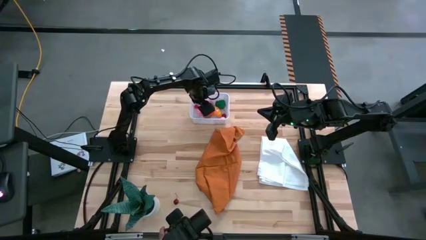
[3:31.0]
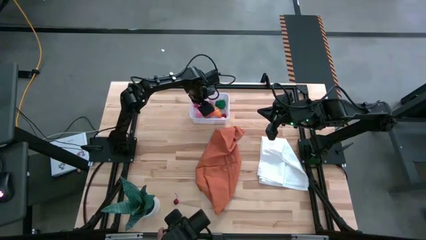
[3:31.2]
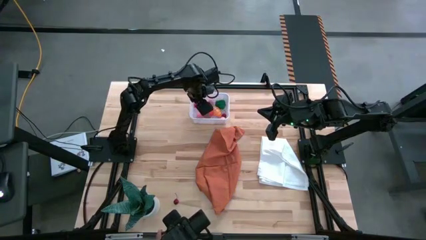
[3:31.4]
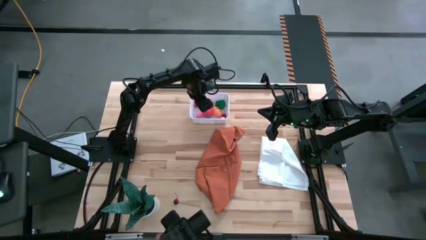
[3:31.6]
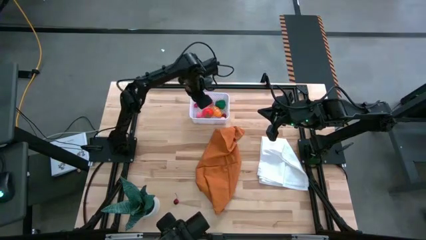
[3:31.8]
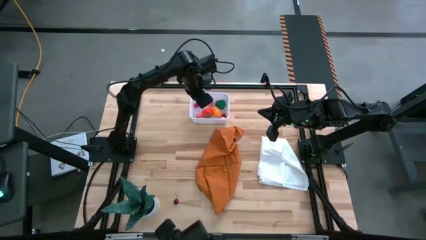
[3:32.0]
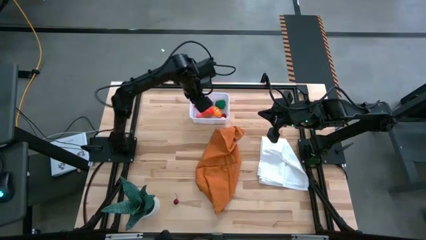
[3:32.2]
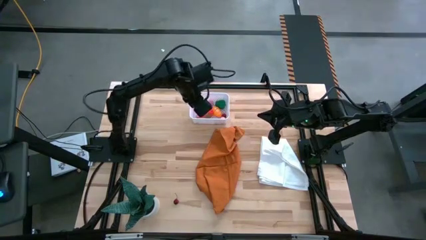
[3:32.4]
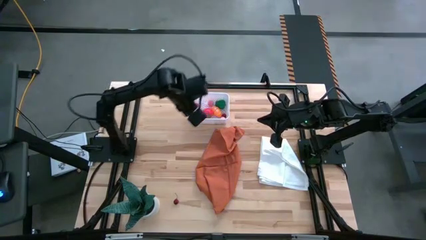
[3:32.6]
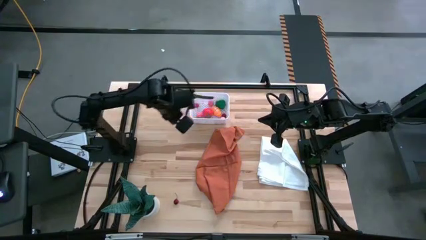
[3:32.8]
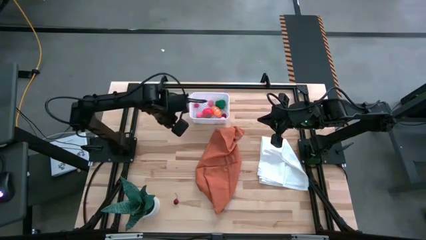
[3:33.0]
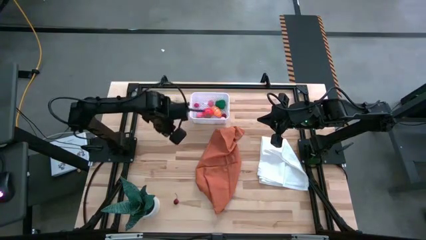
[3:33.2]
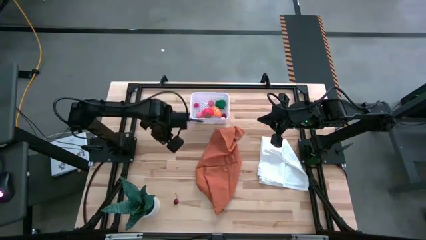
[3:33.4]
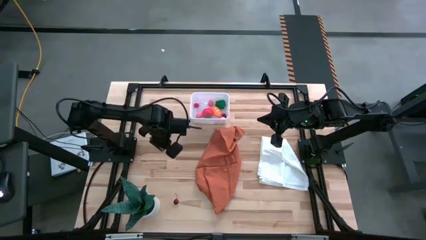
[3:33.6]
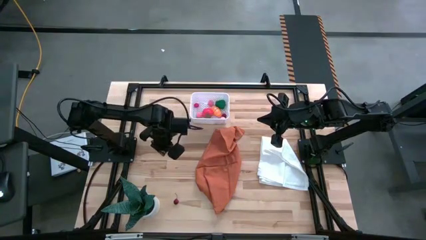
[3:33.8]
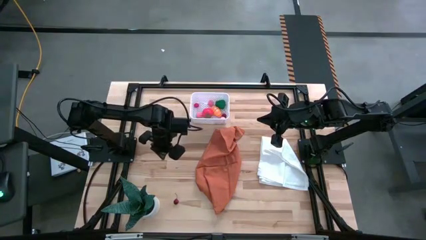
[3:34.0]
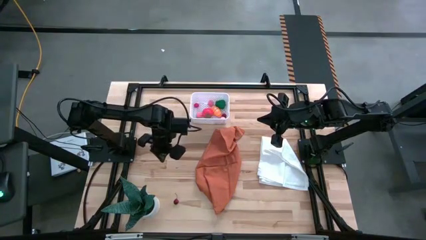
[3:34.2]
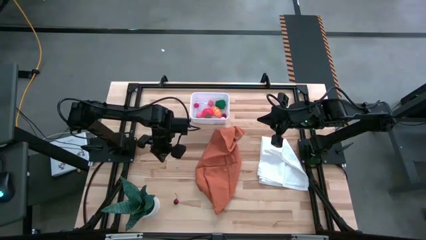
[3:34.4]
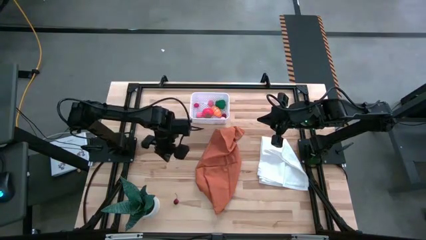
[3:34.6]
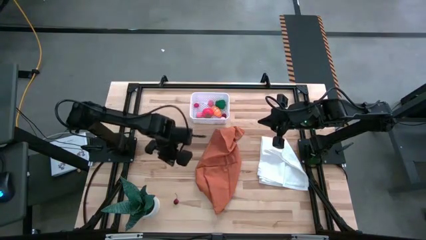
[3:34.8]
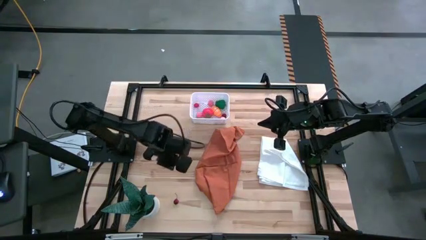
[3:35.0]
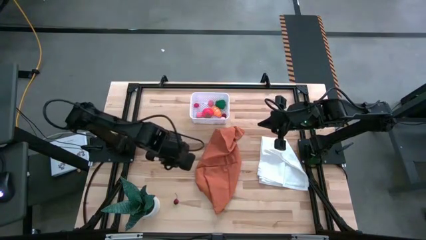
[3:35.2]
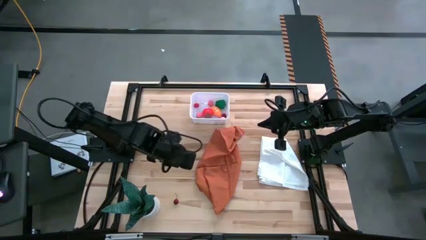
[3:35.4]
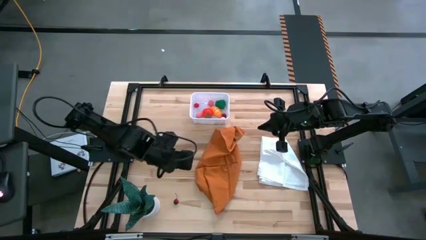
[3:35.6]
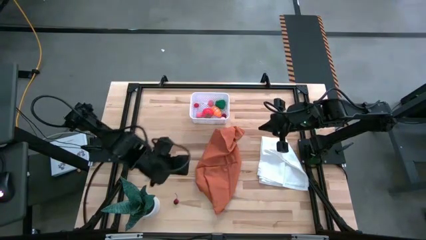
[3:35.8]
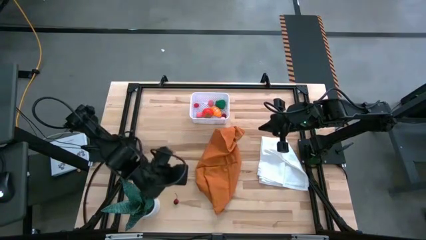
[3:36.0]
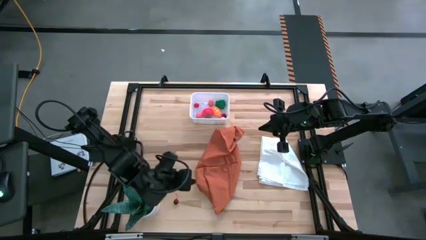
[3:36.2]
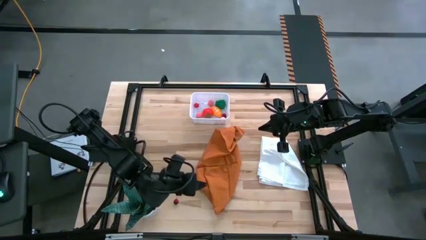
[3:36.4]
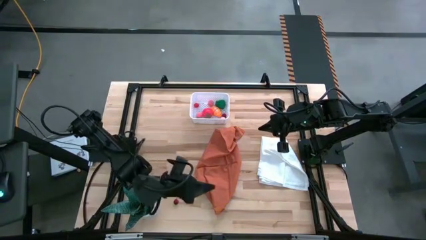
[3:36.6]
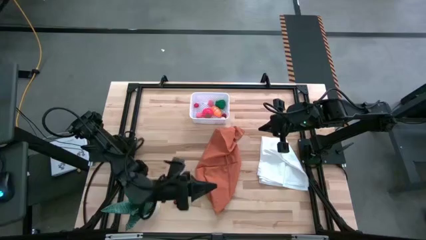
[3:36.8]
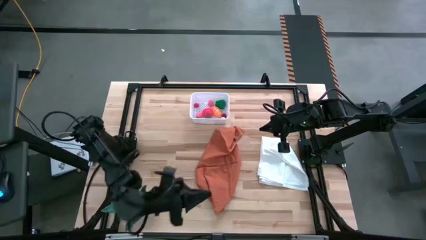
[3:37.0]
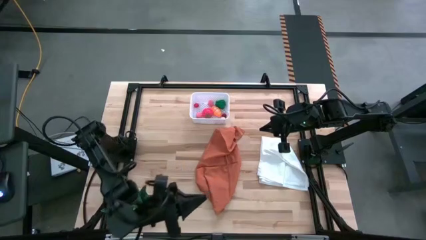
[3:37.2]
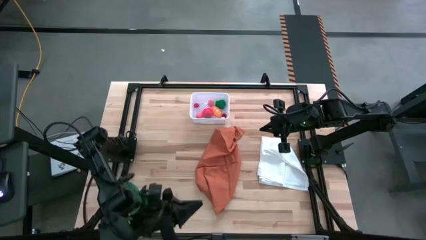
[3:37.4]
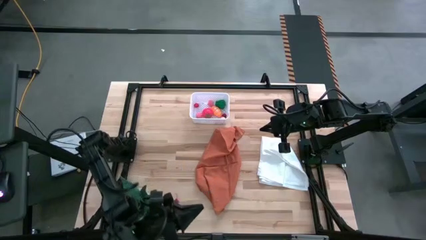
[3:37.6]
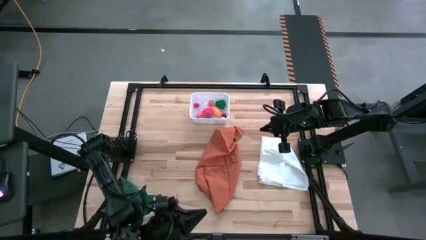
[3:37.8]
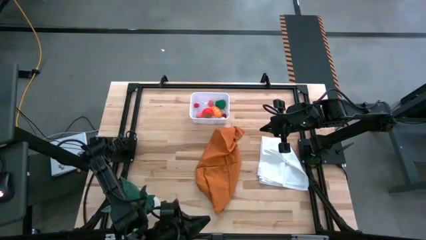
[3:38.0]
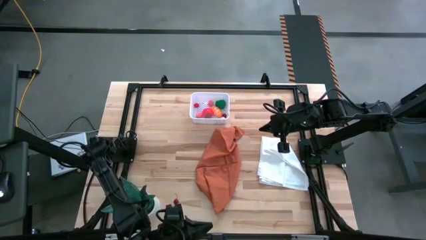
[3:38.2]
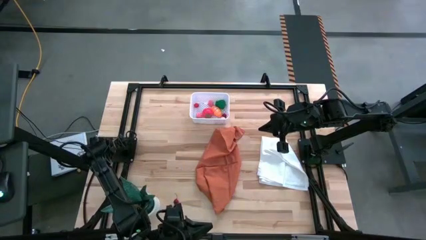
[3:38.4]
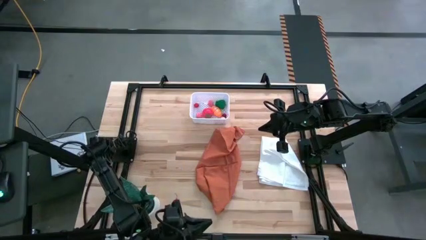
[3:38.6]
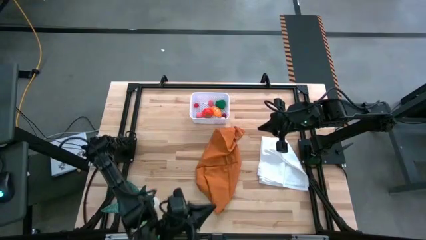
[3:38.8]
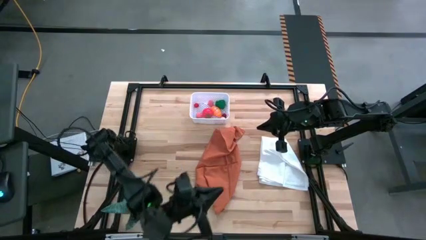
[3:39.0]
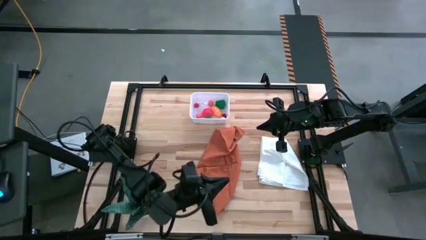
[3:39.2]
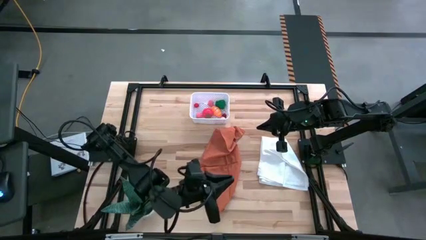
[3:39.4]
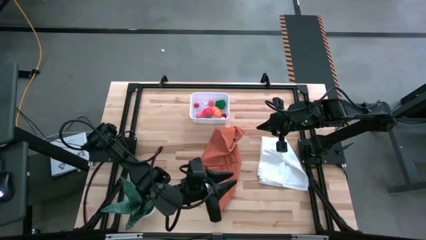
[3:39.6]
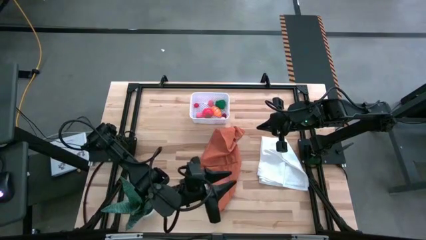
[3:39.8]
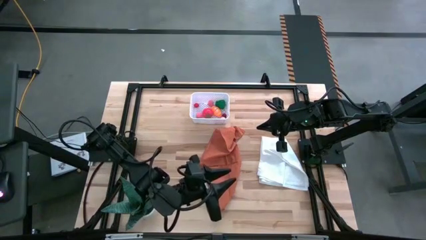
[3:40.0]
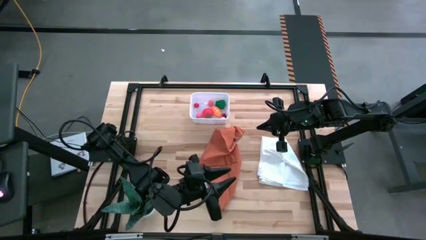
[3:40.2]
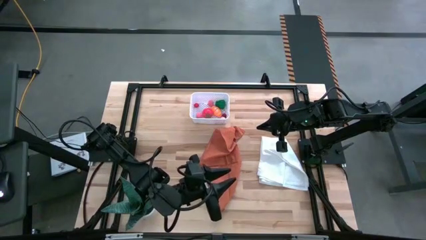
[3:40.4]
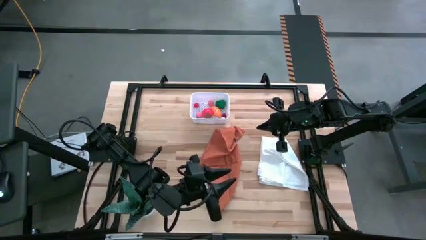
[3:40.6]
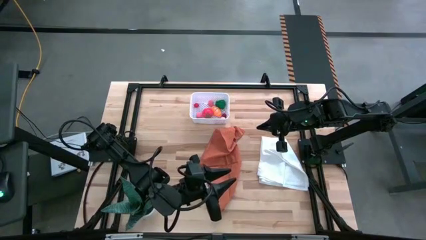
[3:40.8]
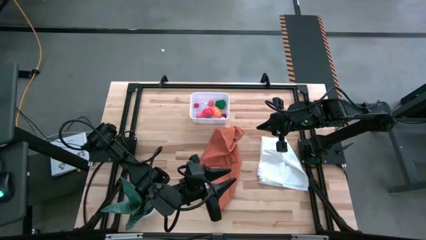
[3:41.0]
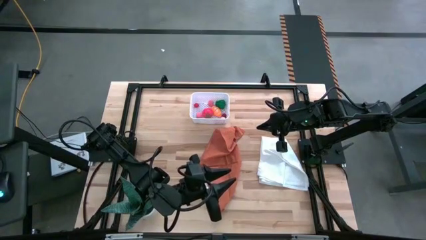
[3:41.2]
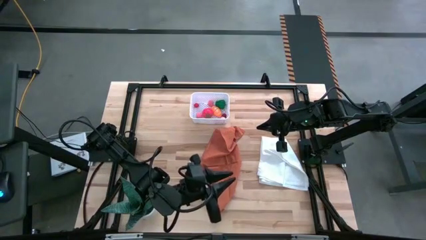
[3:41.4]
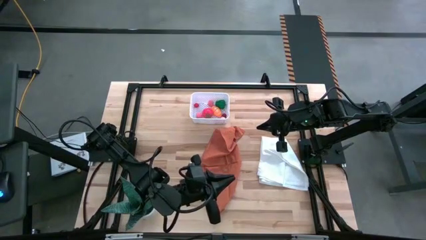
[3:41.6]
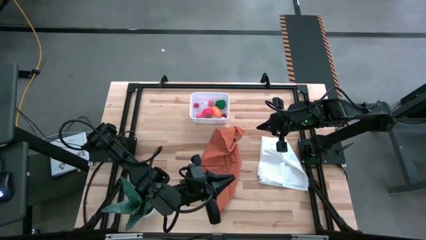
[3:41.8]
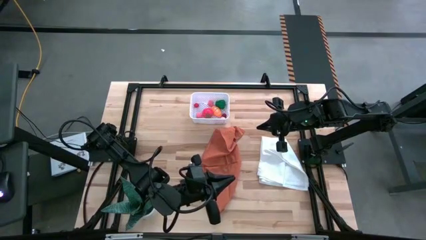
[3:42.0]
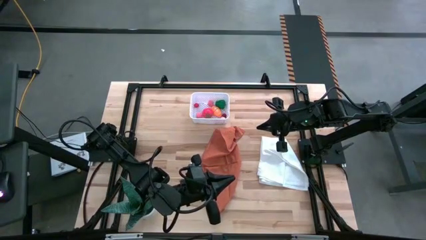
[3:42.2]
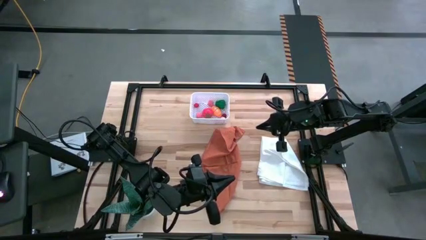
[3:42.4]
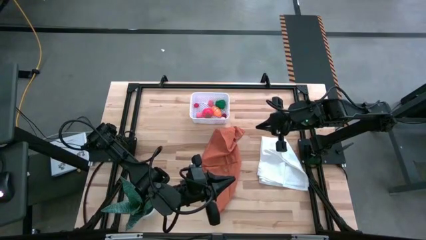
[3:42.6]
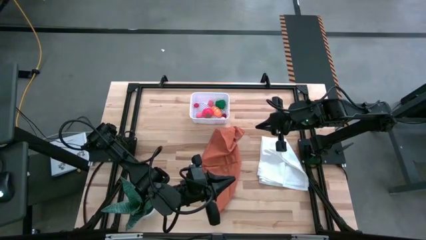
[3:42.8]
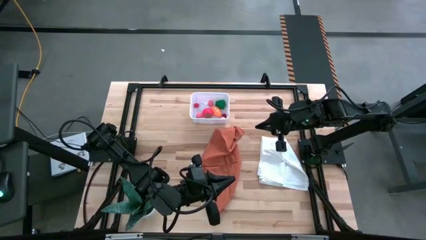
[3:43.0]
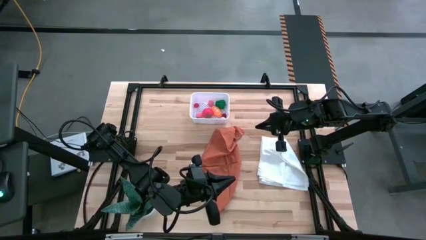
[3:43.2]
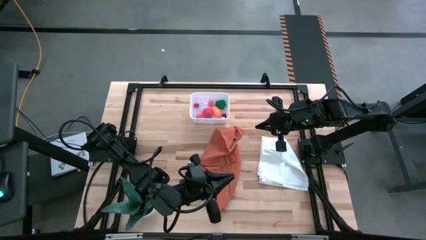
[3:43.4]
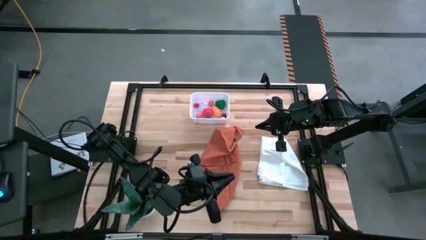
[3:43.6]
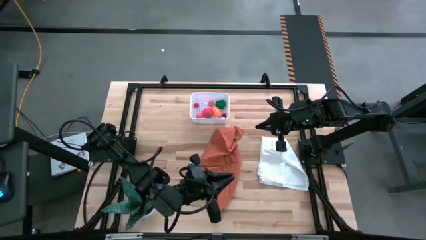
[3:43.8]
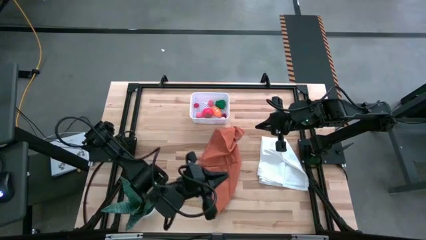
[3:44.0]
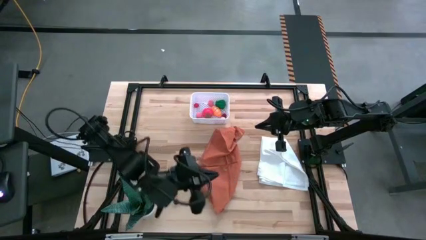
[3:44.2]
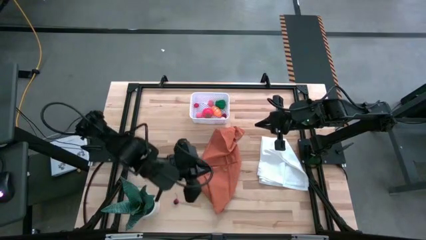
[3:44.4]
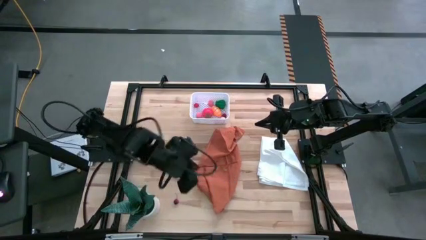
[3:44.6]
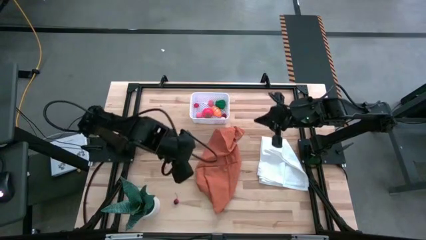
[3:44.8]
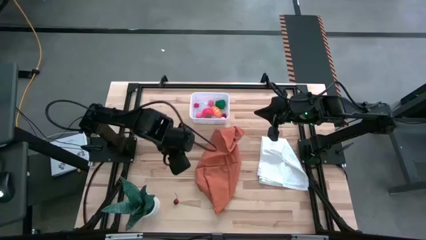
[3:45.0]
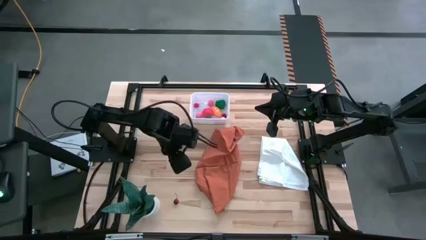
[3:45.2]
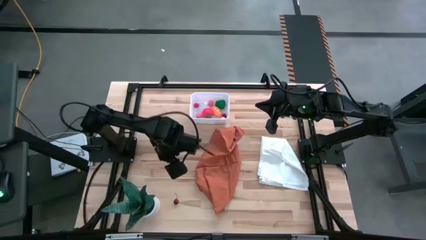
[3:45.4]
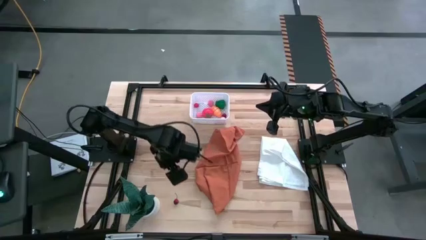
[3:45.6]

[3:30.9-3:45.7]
Task: Pick and placing Produce into tupperware
Put the red cherry into the white basket
